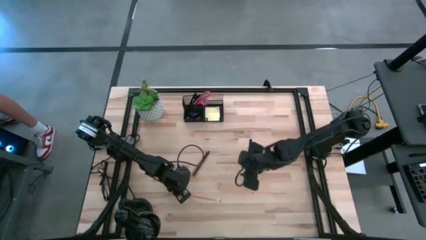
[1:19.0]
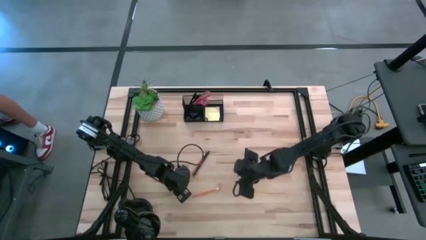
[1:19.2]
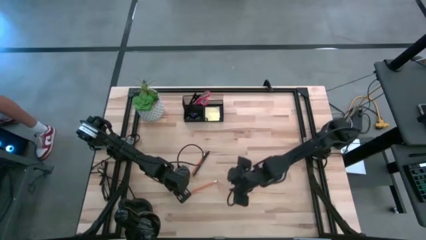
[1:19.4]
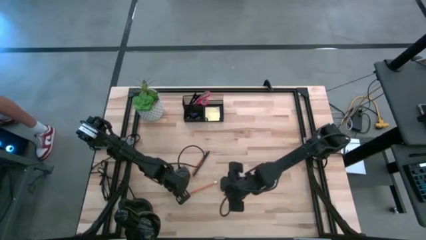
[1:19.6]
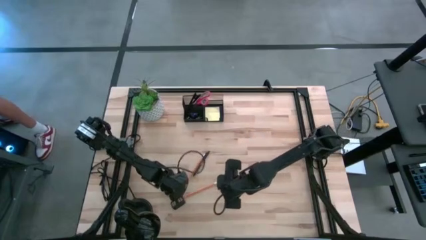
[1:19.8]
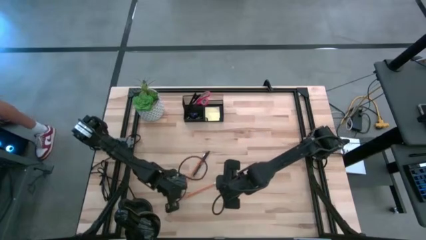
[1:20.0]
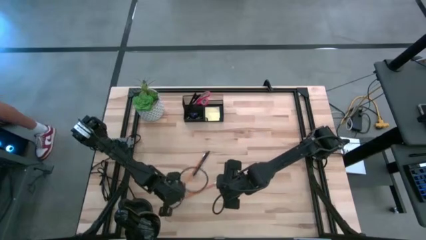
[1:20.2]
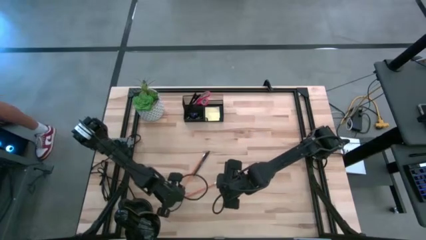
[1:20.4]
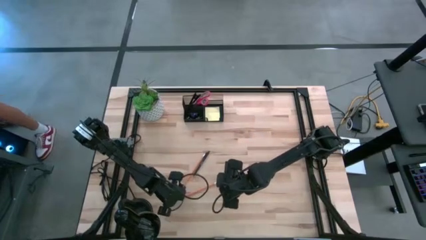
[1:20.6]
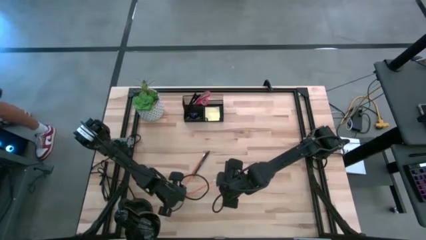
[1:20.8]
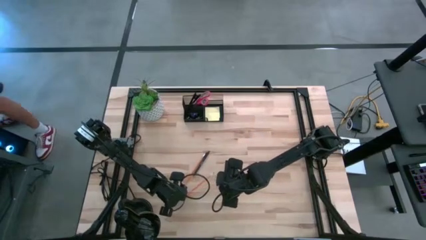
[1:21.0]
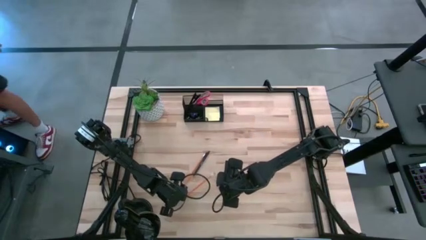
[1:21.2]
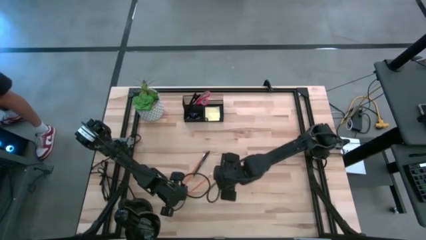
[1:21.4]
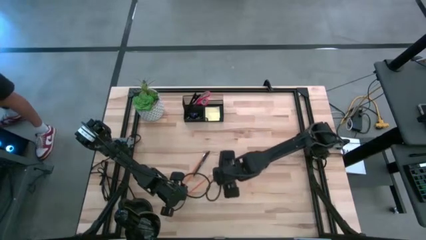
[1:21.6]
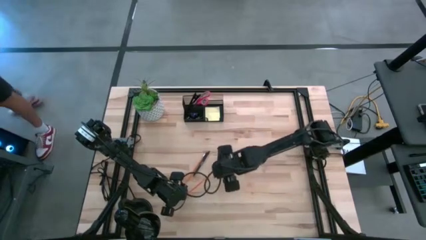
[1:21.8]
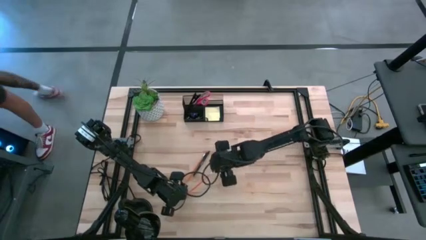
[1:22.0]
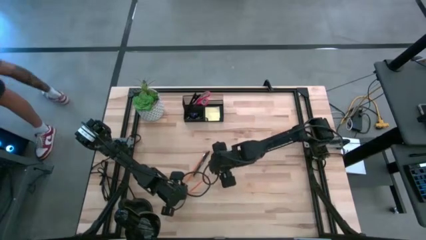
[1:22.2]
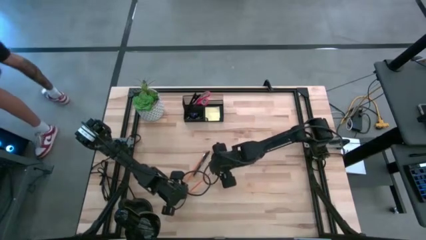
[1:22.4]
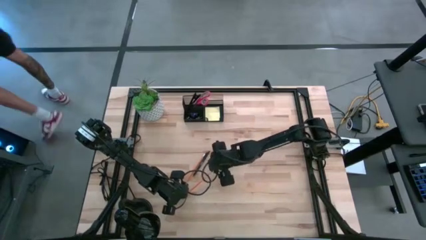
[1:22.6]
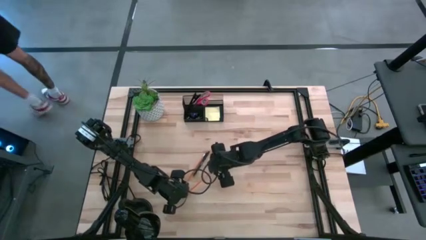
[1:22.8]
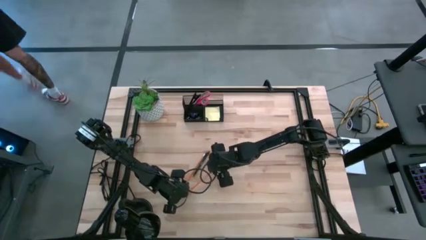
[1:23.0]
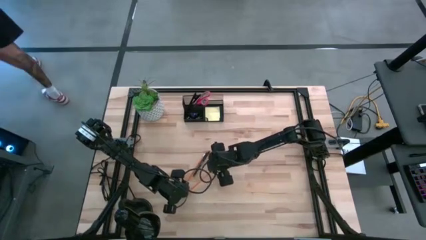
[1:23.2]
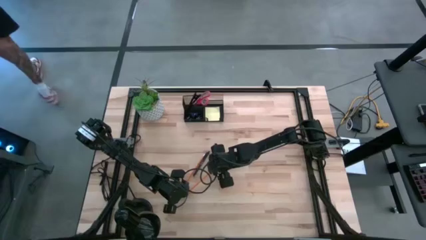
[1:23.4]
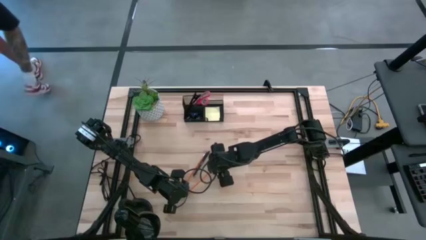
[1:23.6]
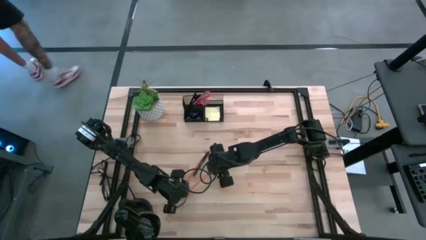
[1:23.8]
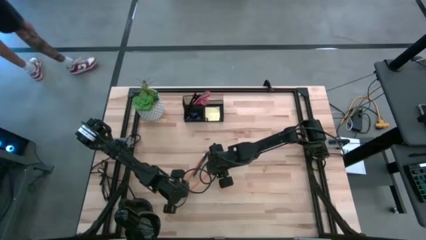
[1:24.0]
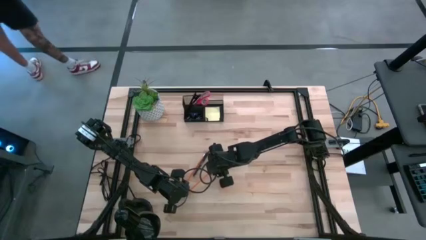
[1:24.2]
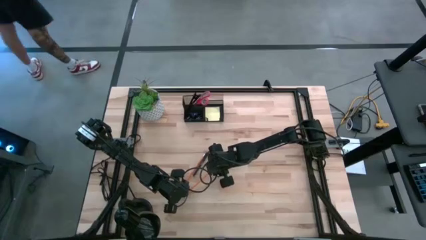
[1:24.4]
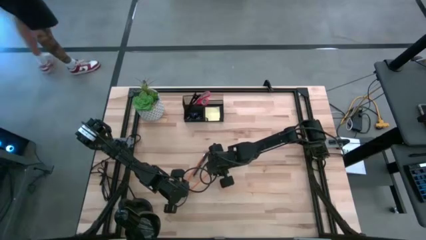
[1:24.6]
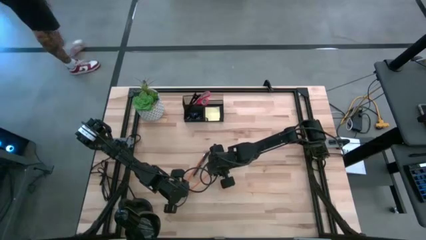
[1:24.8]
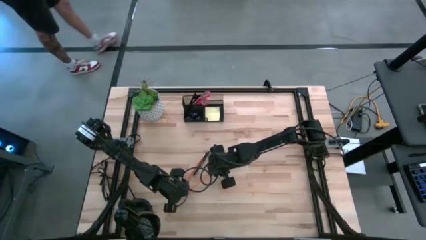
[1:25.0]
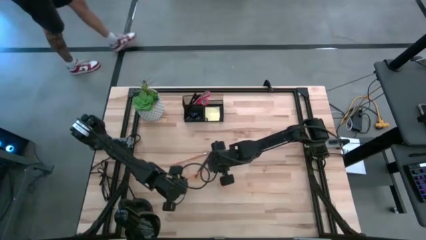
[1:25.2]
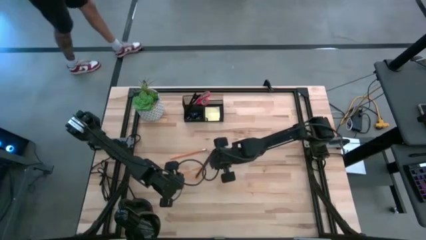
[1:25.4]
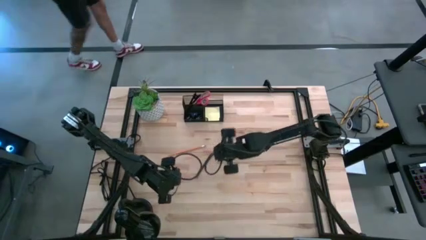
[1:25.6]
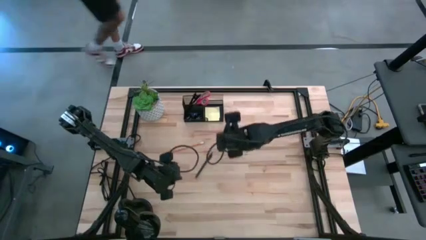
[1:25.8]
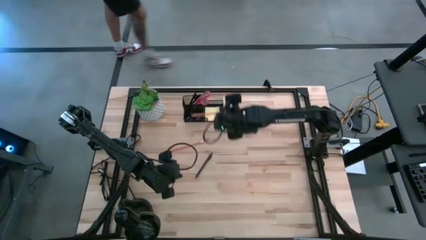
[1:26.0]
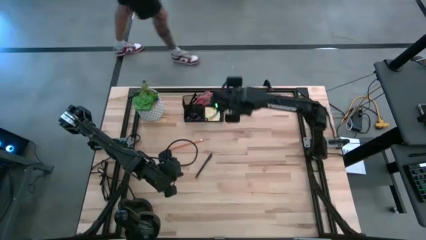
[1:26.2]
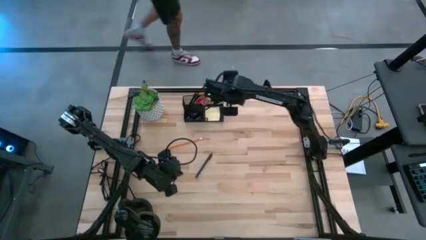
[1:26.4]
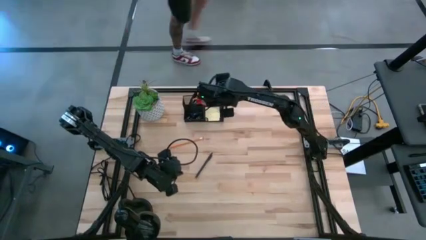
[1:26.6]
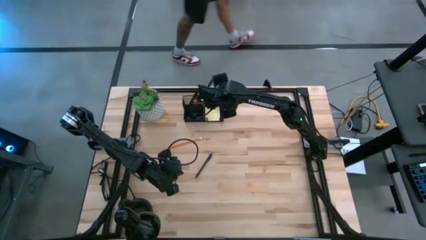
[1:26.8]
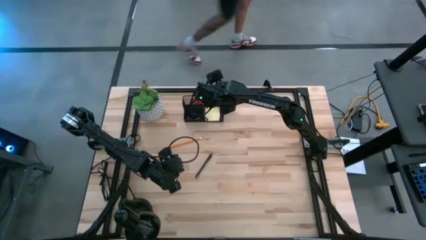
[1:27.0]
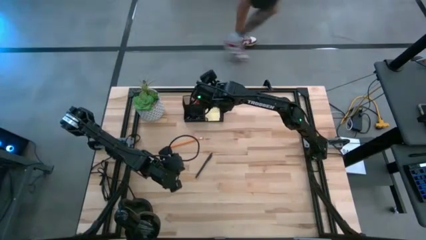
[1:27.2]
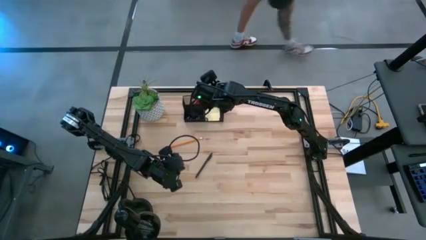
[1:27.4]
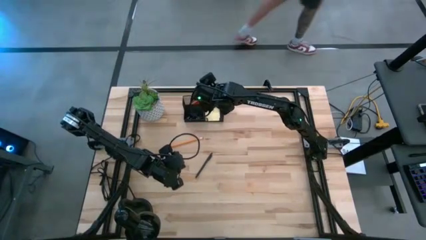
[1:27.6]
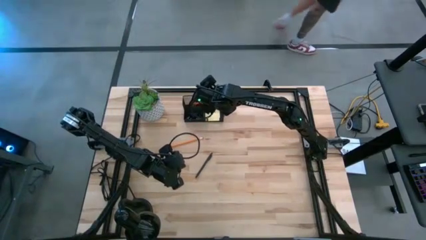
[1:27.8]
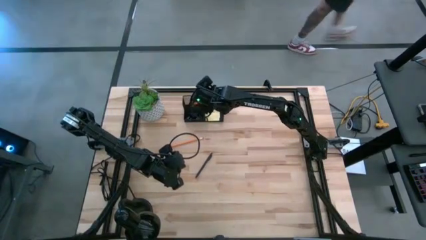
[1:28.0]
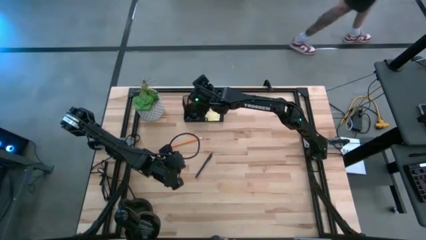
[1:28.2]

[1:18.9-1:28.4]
Task: Pick and place office supplies into organizer
Put the bottom pencil into the top left section of the black desk organizer

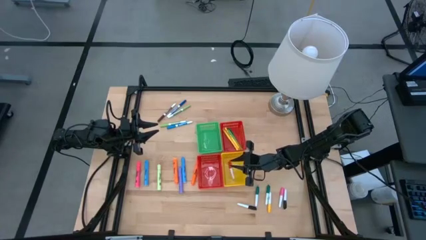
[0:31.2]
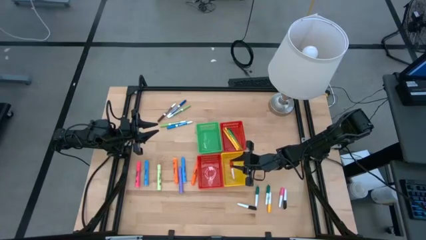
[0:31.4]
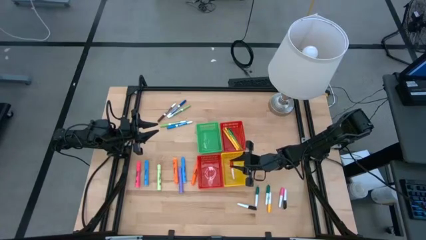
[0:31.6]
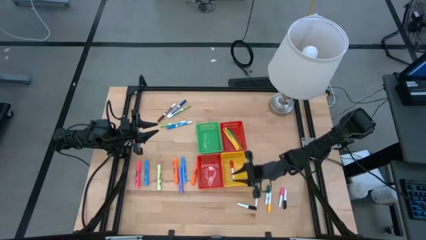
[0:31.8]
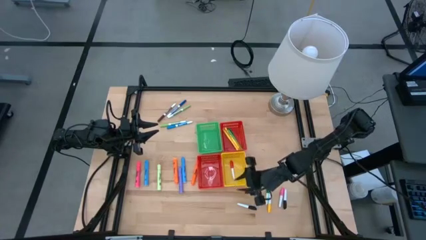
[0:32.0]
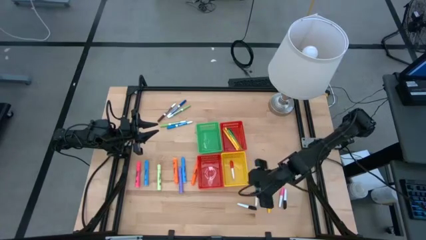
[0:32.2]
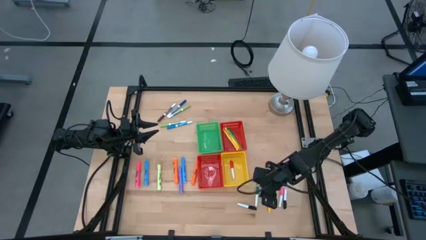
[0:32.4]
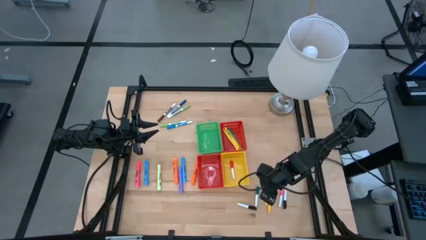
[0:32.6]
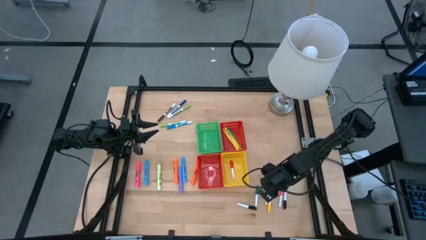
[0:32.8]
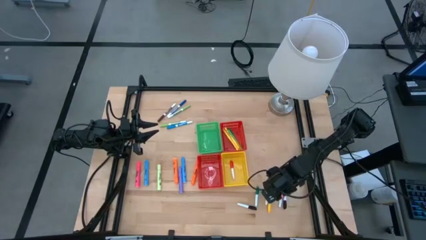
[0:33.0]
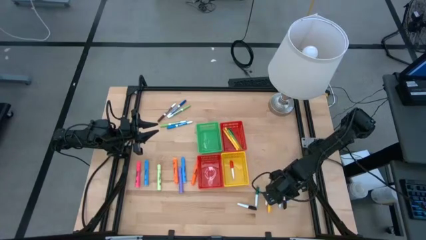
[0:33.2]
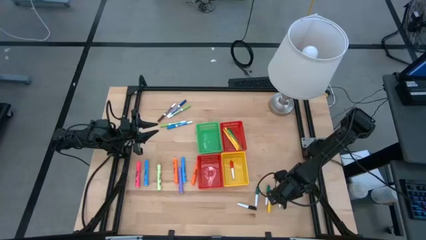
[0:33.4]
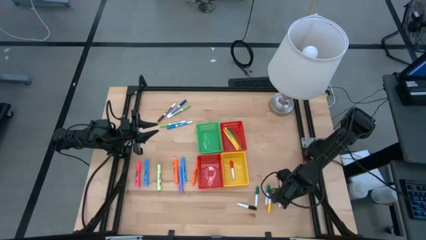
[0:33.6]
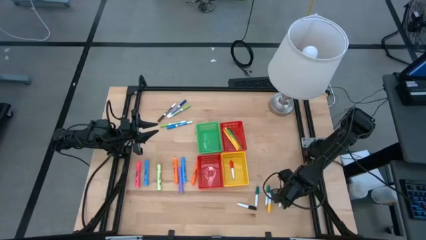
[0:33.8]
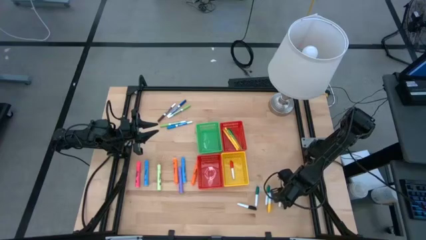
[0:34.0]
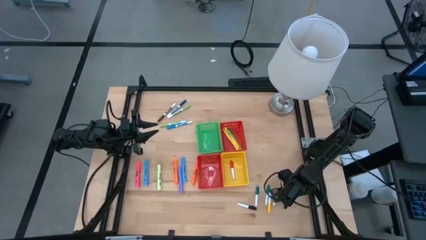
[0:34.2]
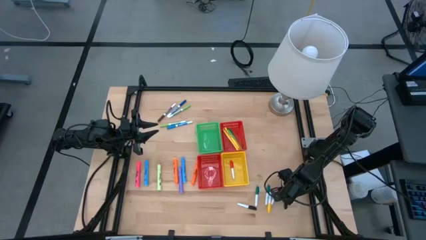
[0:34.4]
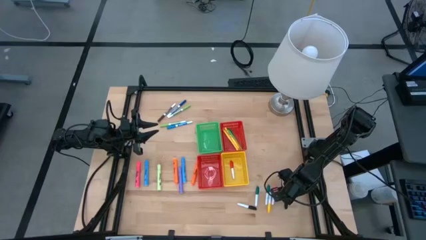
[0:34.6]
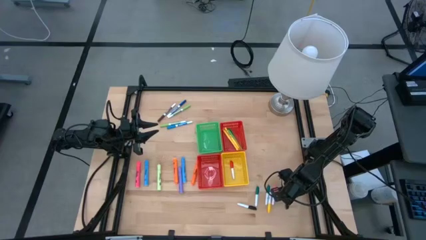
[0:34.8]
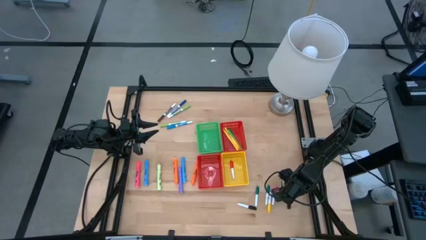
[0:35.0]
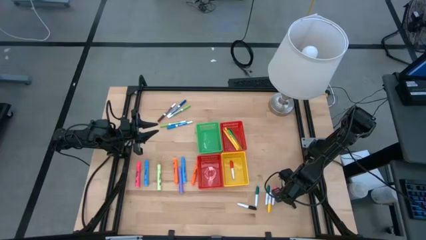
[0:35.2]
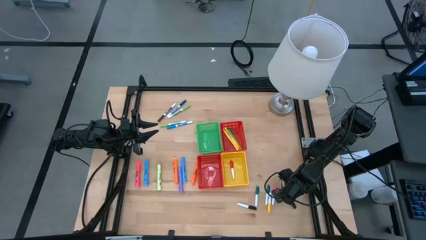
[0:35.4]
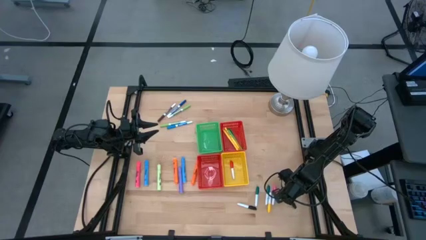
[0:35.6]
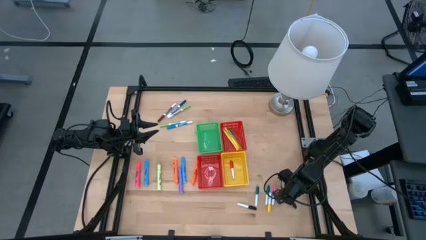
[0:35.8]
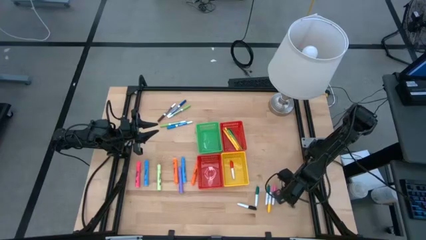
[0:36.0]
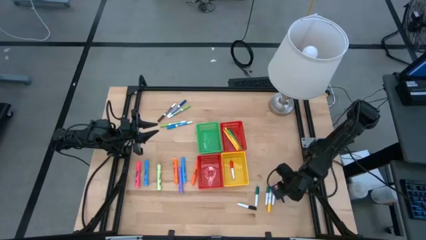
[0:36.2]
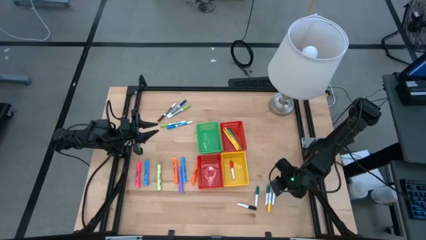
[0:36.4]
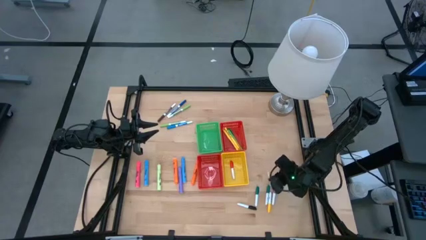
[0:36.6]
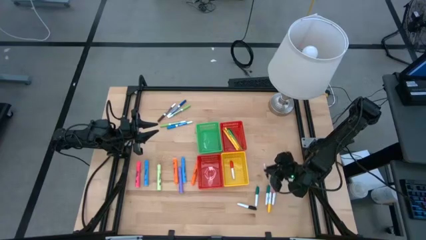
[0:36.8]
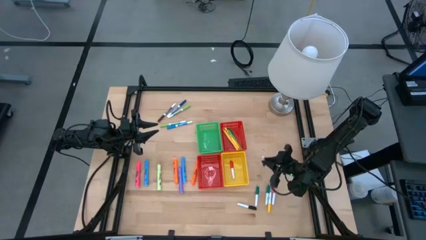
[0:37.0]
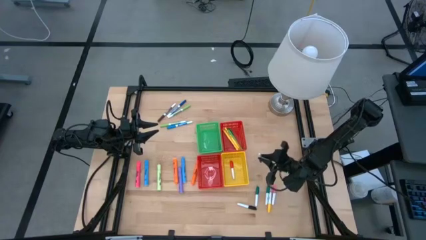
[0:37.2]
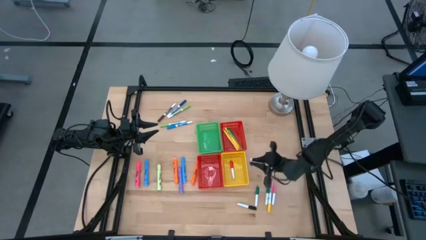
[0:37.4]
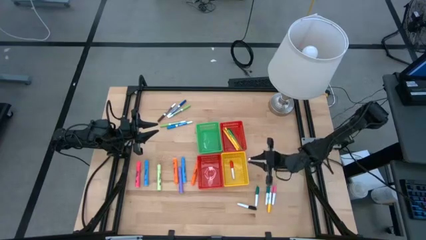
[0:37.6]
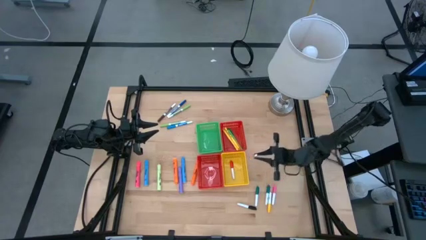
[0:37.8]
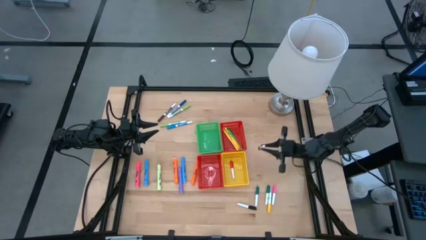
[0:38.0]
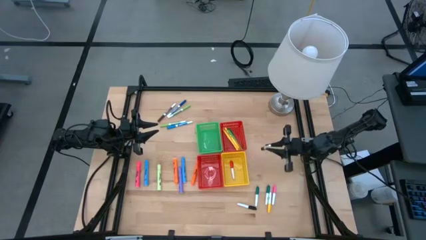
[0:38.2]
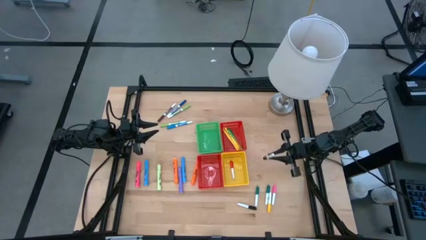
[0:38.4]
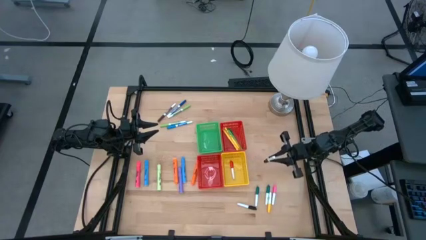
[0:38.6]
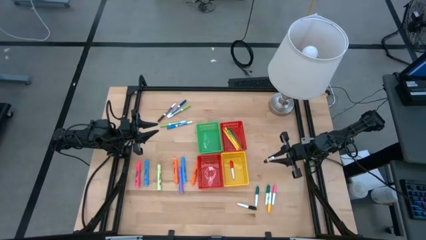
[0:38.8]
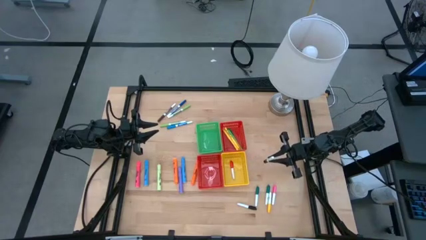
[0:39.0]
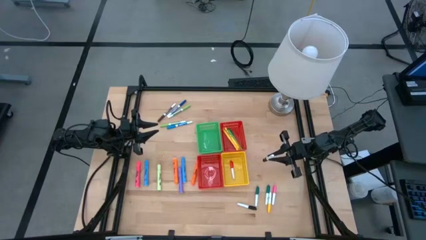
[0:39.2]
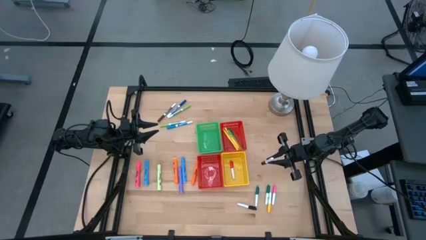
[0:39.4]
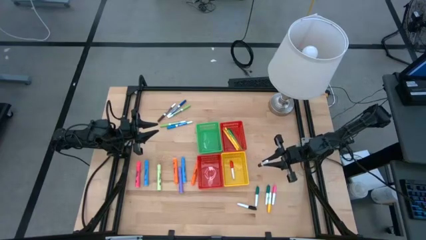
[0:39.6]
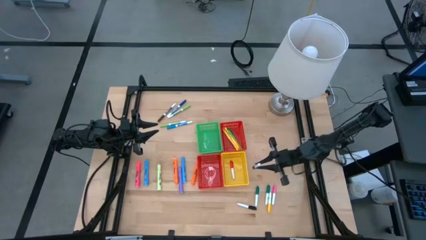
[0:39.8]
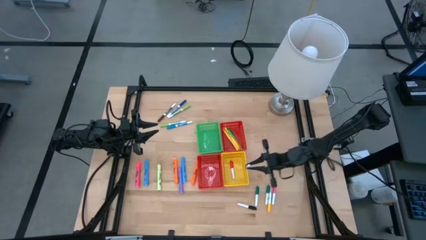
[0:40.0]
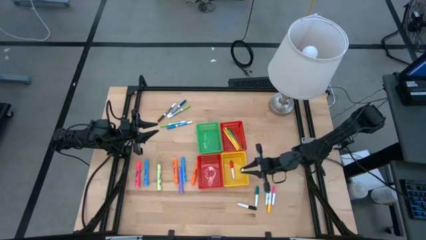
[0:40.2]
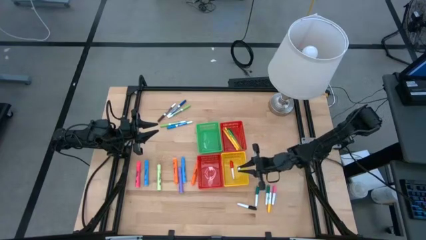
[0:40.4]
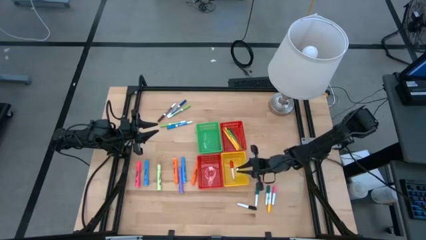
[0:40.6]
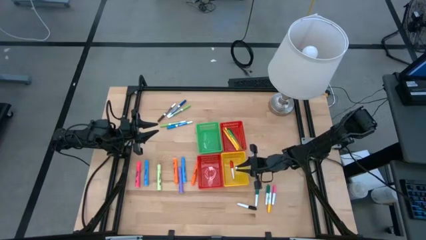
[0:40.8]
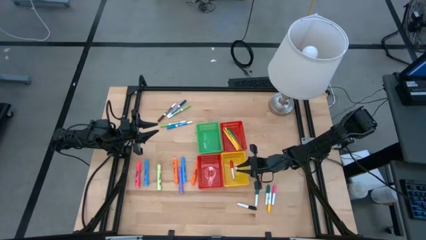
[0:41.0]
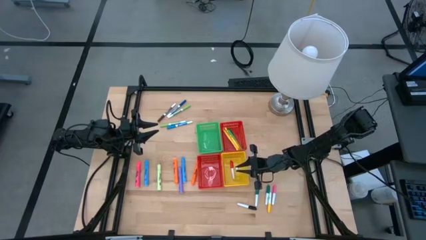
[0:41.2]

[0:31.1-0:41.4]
Task: Pick & Place Markers
Put the small black highlighter pen into the yellow bin
